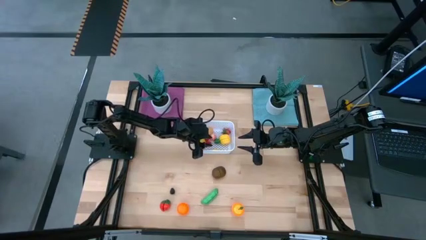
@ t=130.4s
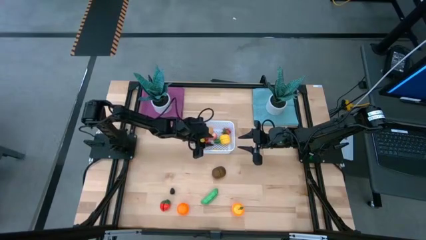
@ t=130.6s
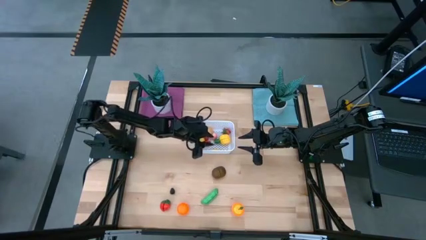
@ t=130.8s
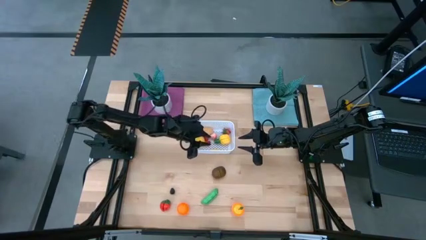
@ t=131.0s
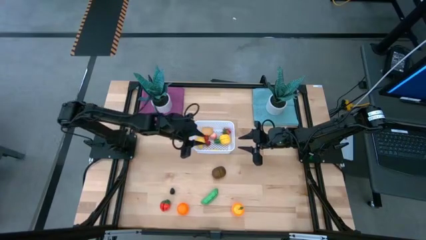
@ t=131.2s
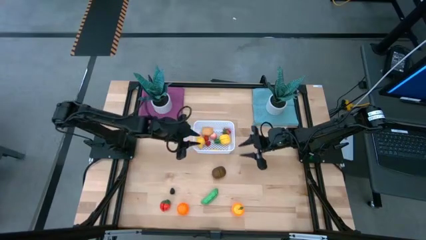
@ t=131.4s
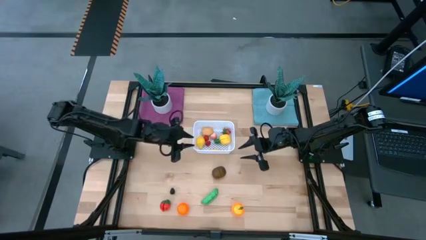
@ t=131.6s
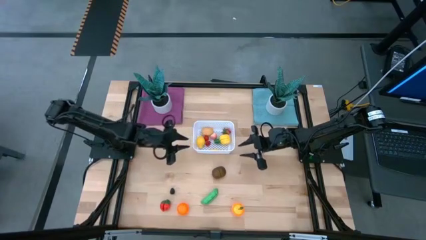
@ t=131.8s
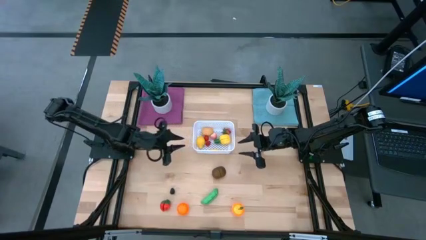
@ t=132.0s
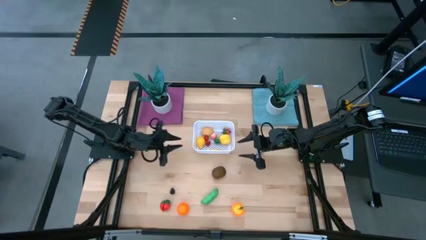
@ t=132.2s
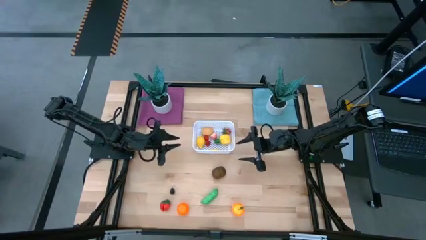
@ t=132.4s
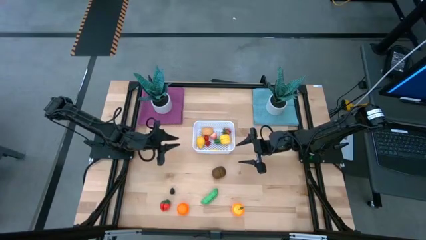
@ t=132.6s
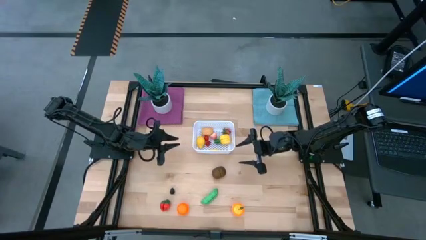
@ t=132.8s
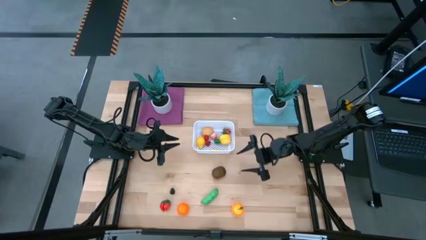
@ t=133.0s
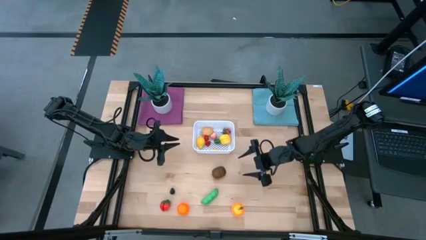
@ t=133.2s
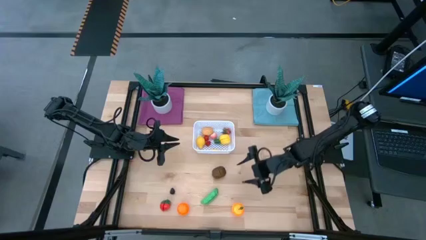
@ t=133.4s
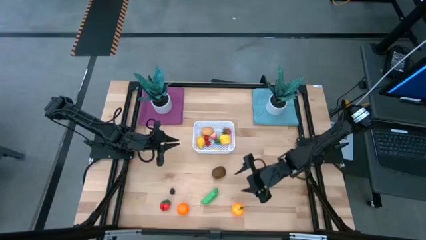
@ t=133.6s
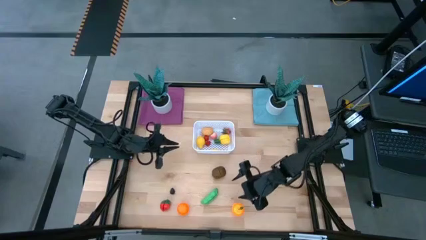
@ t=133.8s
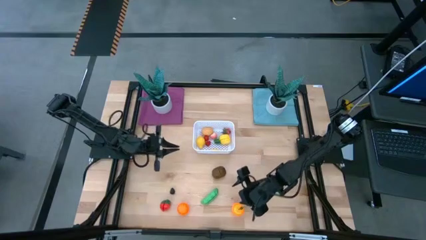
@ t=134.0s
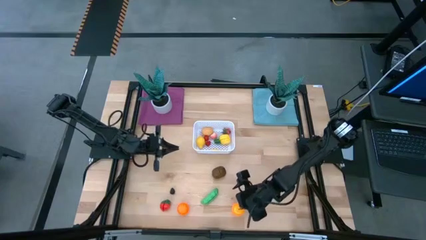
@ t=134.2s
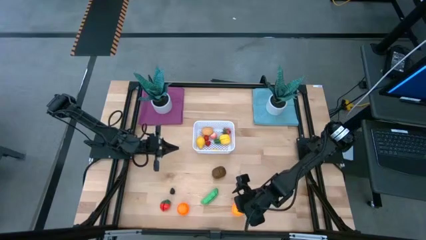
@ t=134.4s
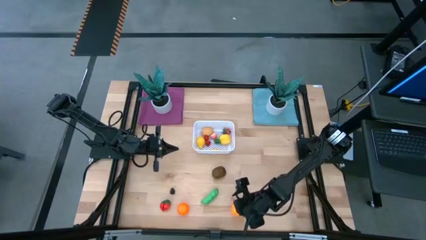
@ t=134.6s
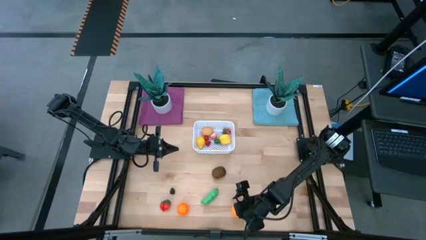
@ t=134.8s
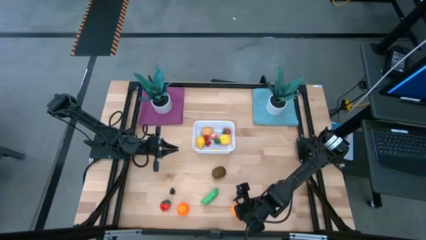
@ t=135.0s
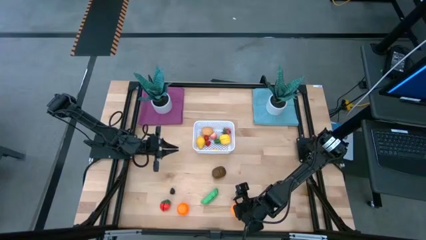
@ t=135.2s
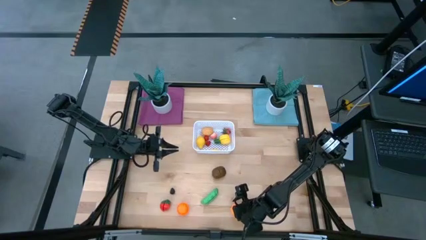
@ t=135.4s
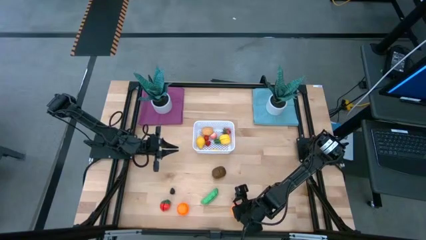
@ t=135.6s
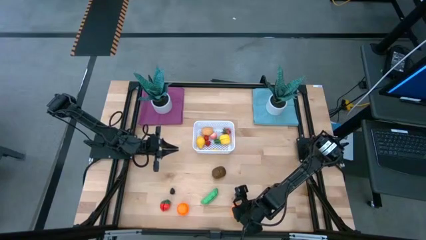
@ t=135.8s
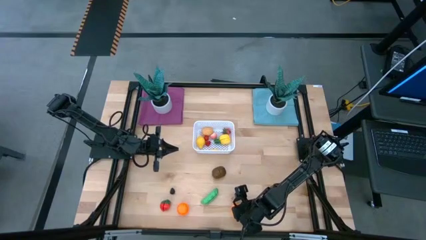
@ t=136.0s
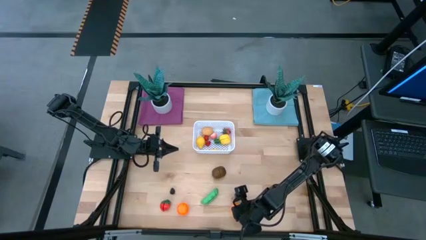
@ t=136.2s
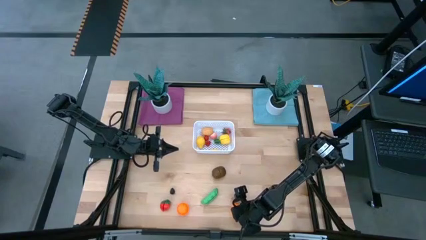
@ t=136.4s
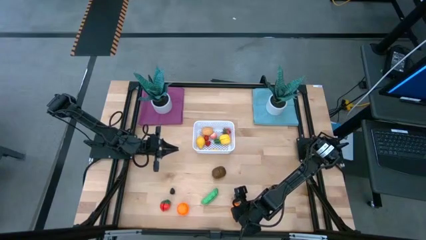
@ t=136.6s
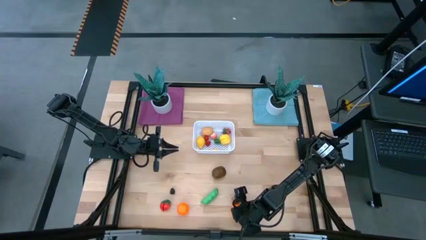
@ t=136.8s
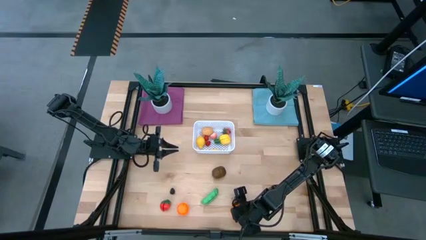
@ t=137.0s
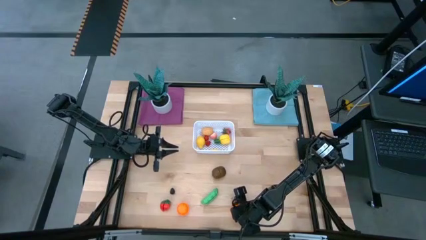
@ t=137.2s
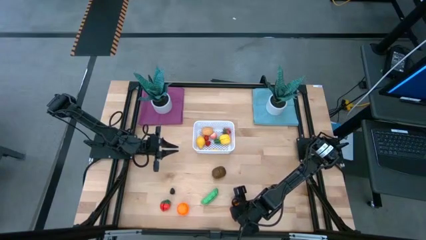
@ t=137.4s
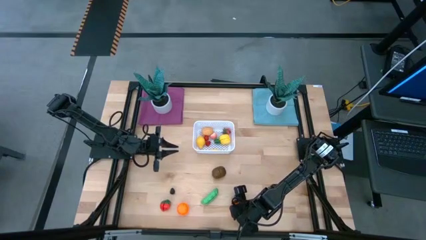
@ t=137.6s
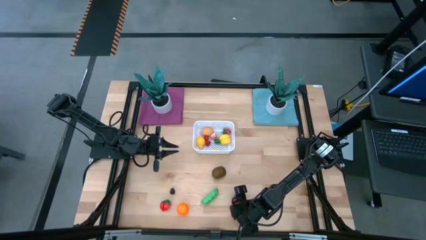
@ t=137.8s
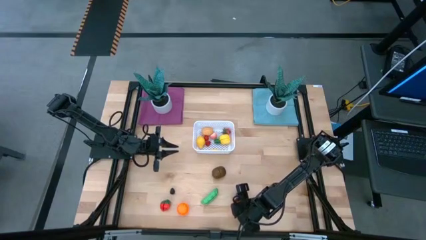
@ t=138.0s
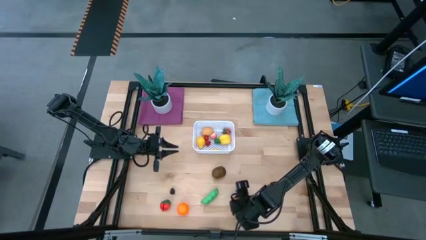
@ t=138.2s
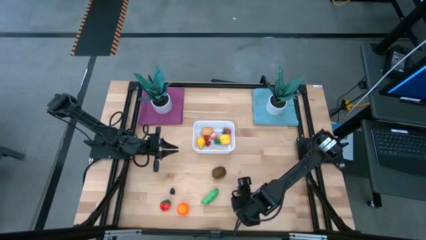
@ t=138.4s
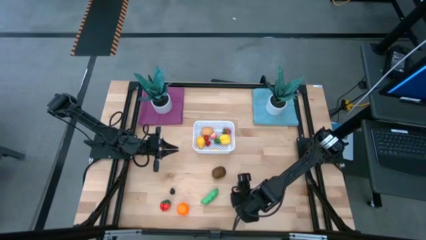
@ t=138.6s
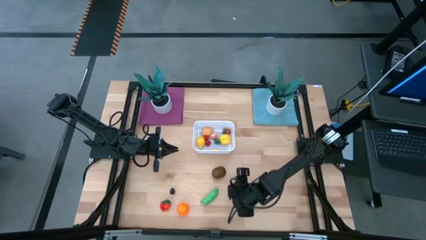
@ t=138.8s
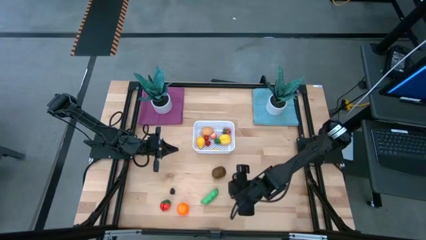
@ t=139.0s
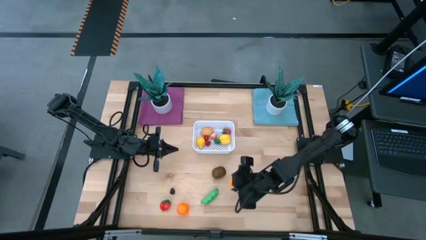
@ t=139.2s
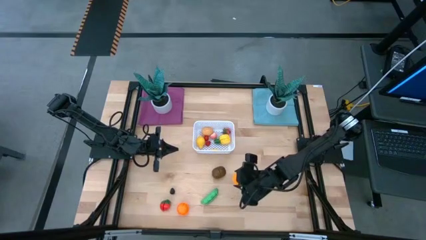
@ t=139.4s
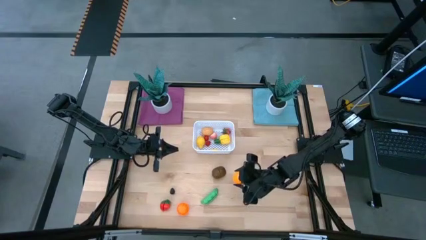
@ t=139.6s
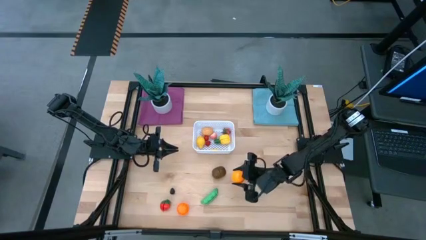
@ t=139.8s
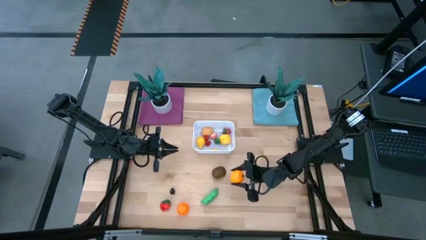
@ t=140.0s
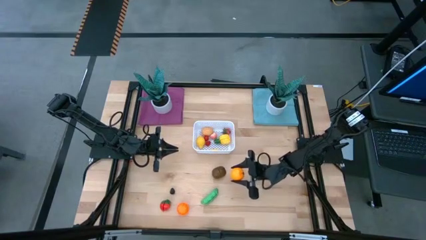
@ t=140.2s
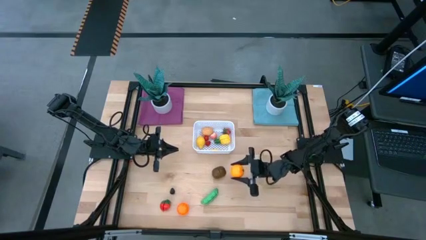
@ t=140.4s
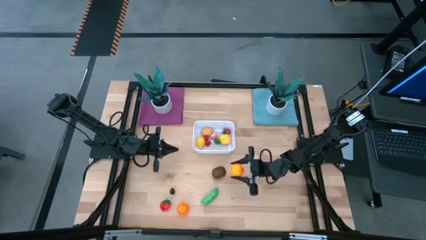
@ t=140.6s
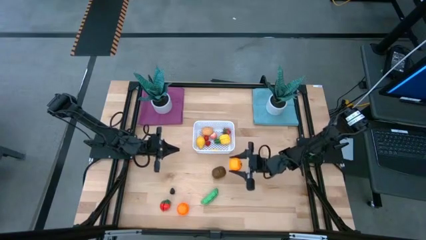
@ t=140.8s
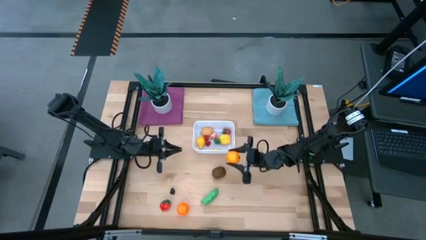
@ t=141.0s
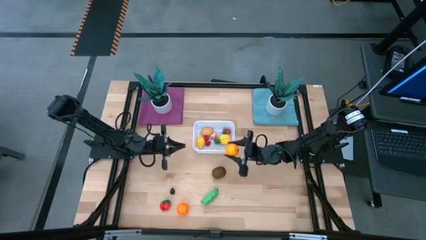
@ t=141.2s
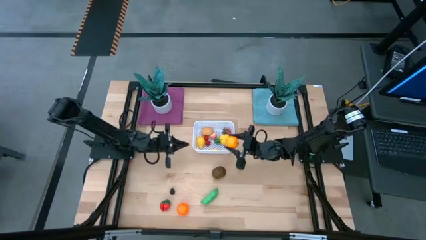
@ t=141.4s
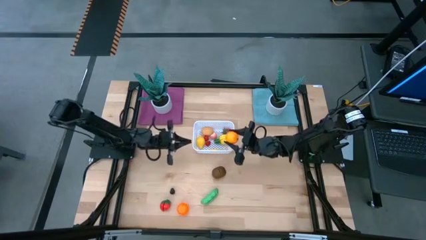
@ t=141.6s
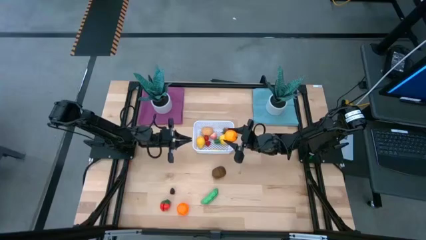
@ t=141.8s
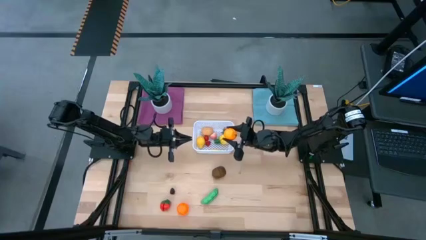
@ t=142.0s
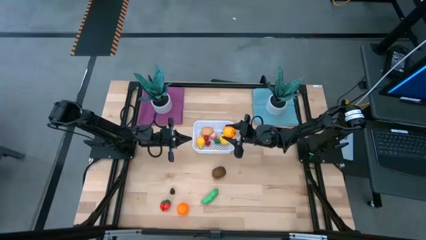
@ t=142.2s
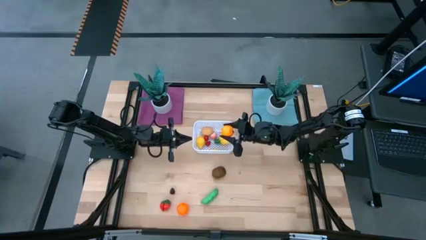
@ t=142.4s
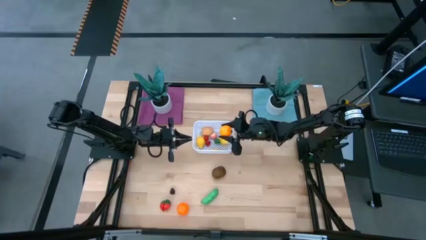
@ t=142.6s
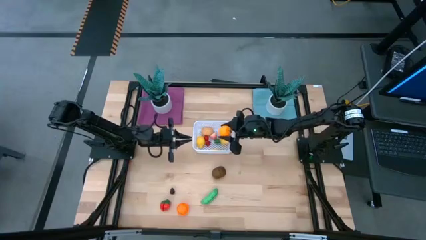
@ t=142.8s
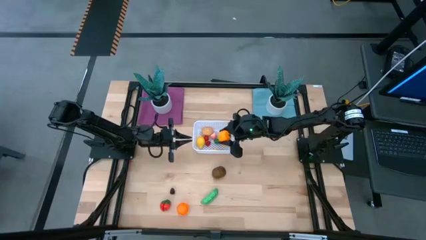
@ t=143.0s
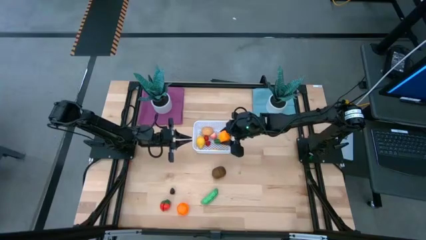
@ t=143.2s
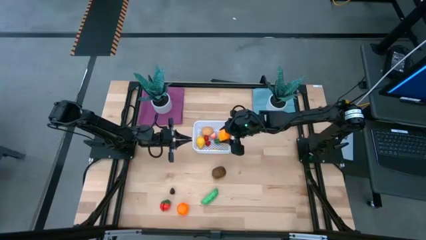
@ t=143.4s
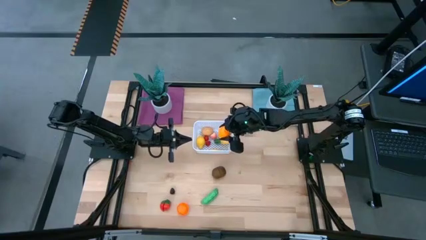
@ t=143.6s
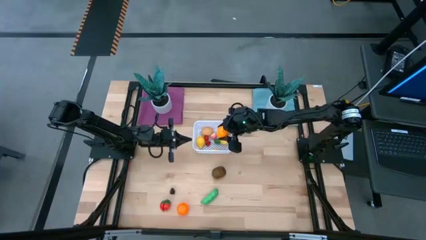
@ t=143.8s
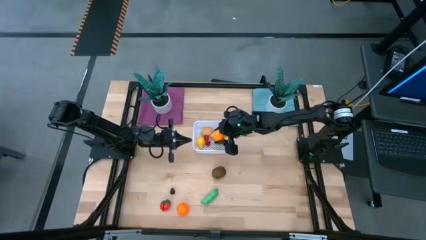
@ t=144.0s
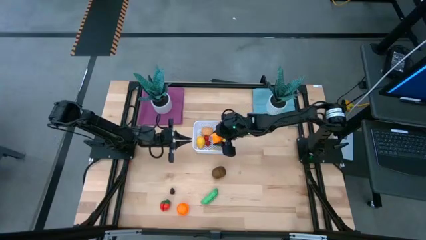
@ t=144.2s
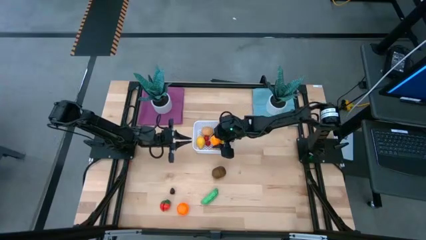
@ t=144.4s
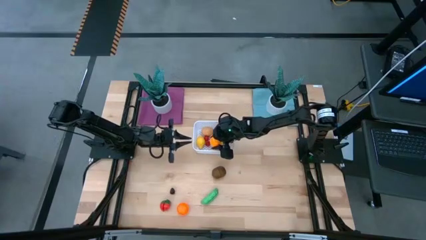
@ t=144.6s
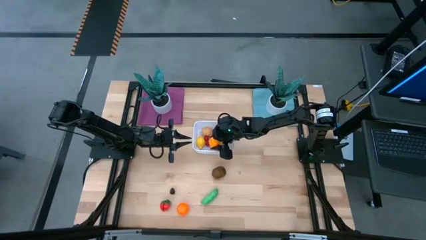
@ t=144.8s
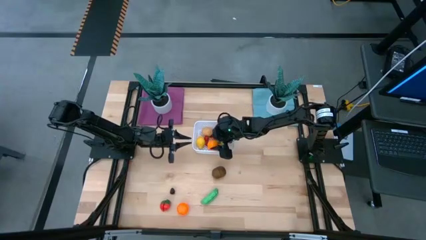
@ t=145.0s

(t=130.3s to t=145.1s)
Task: Pick and placing Produce into tupperware
Put the orange into the white bin
